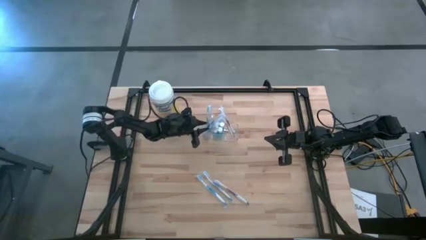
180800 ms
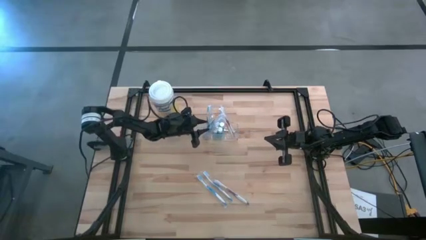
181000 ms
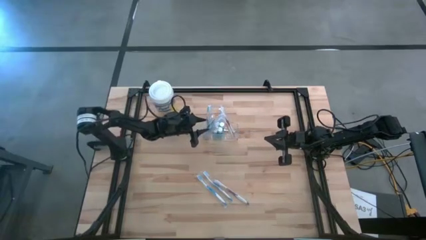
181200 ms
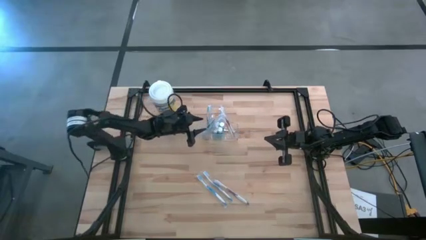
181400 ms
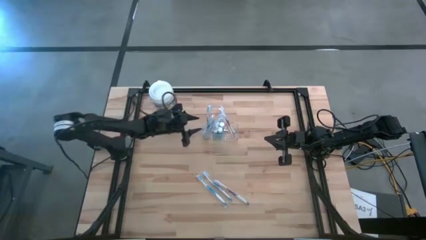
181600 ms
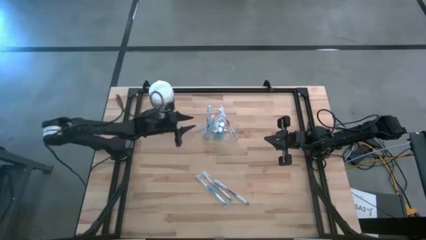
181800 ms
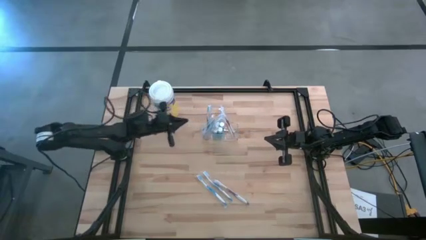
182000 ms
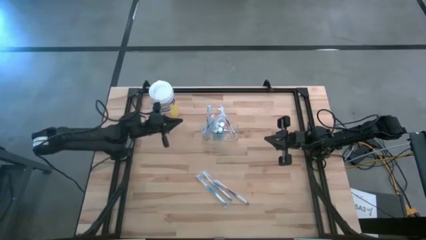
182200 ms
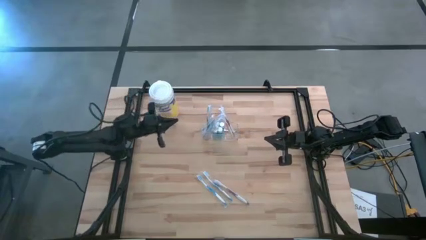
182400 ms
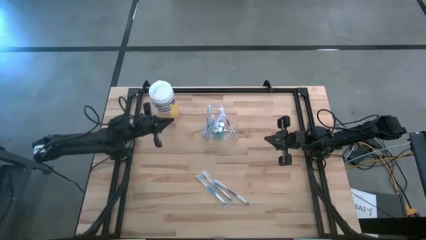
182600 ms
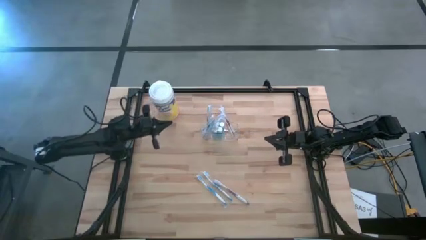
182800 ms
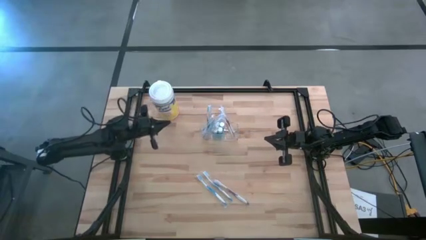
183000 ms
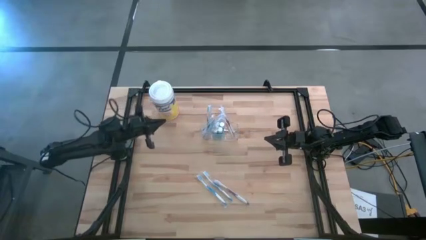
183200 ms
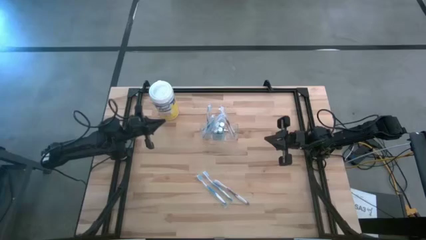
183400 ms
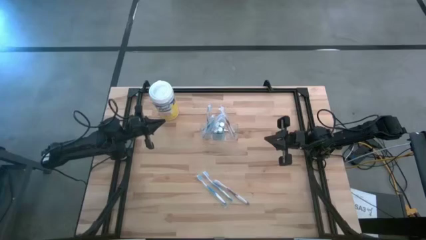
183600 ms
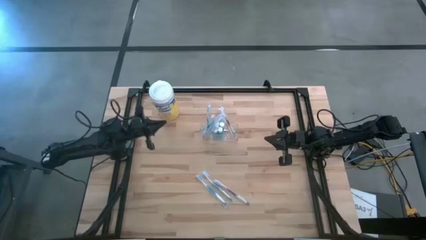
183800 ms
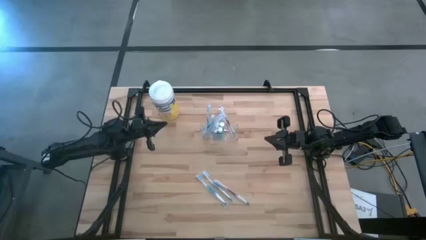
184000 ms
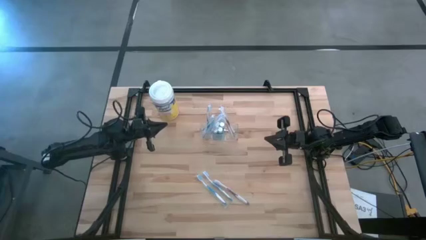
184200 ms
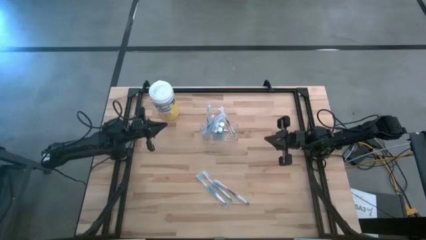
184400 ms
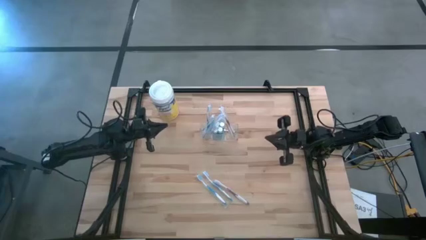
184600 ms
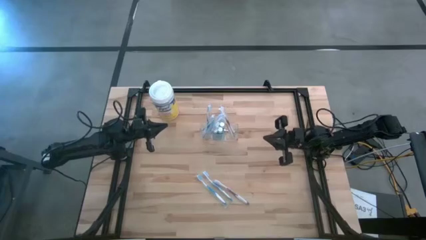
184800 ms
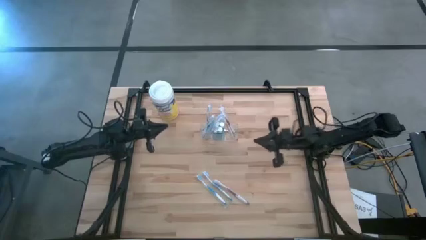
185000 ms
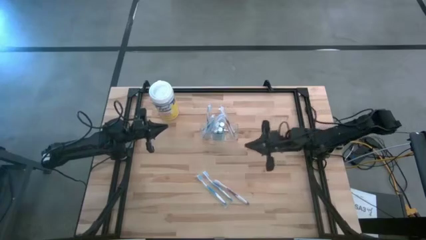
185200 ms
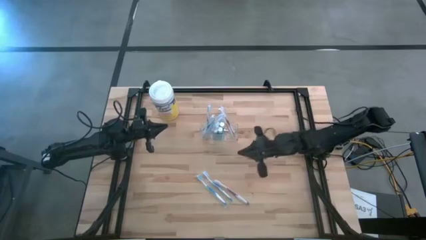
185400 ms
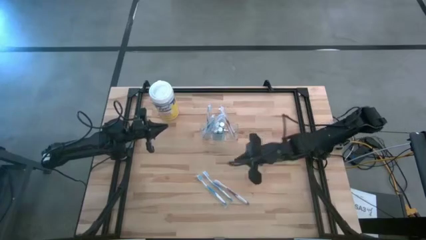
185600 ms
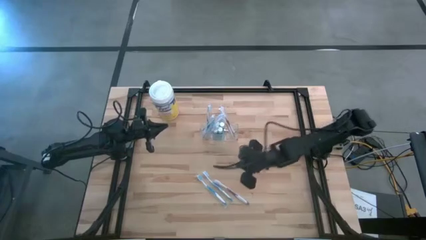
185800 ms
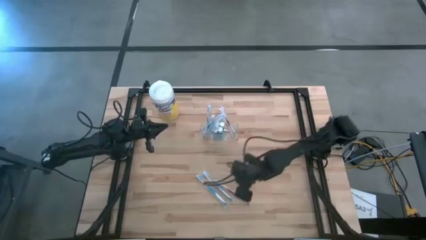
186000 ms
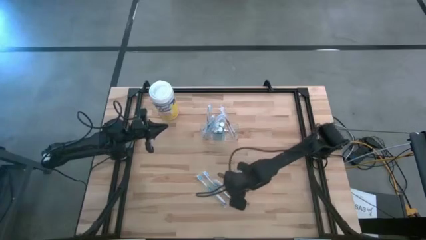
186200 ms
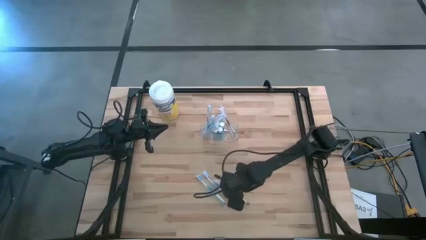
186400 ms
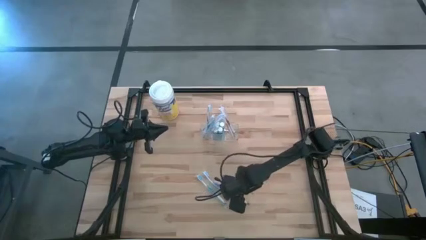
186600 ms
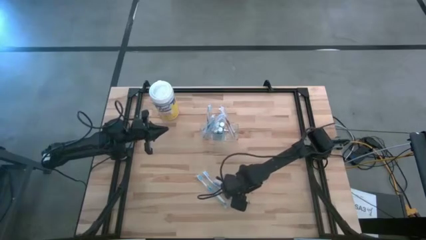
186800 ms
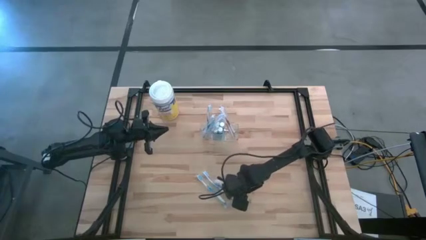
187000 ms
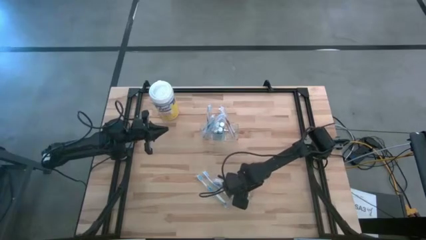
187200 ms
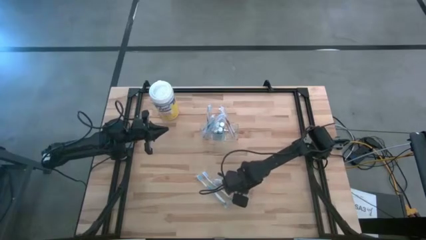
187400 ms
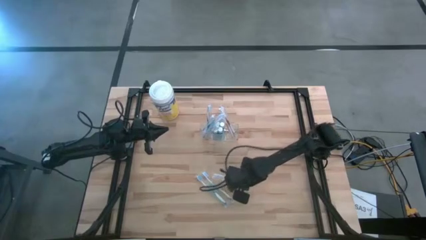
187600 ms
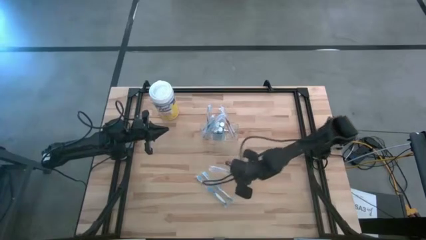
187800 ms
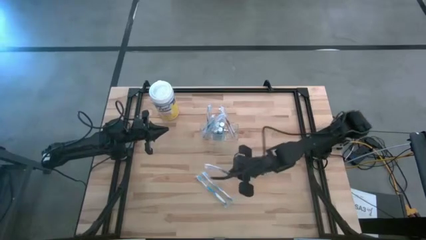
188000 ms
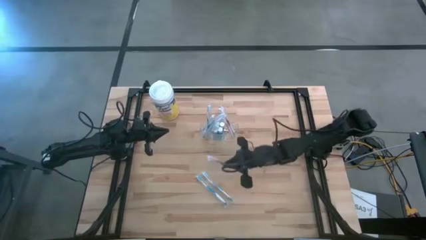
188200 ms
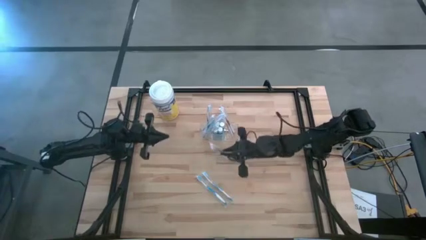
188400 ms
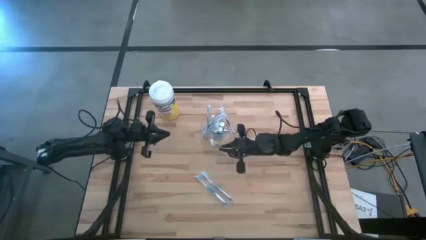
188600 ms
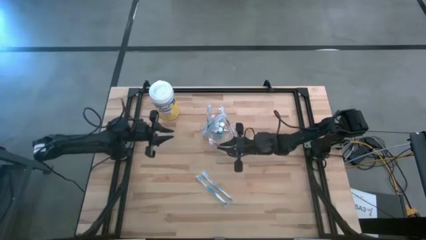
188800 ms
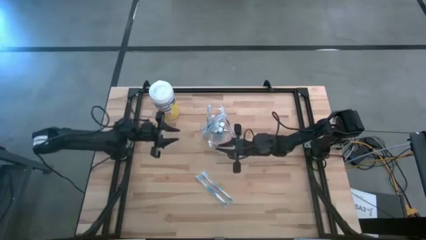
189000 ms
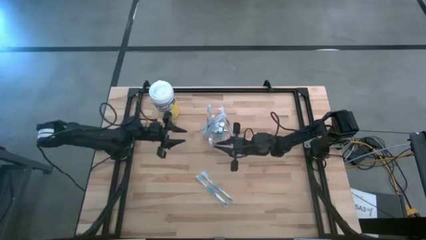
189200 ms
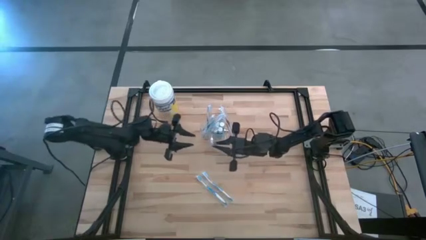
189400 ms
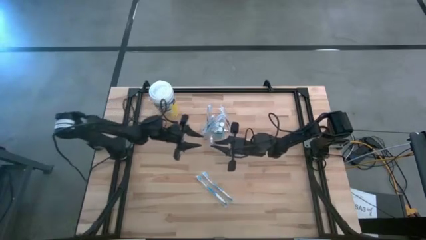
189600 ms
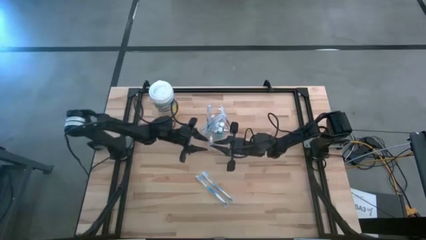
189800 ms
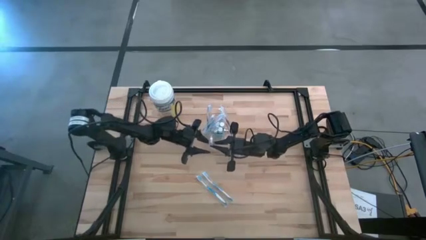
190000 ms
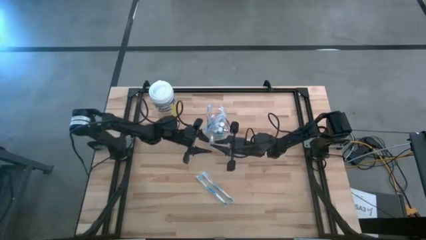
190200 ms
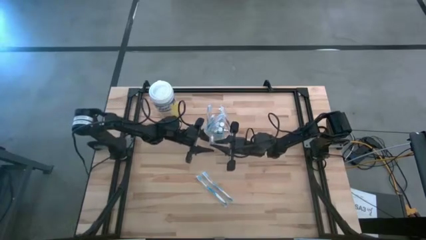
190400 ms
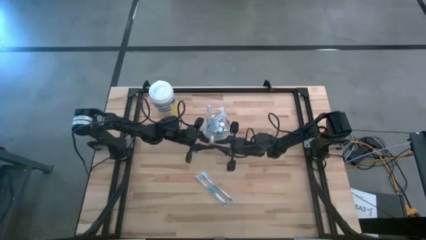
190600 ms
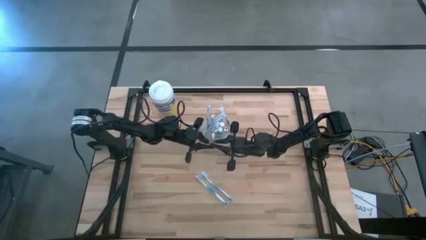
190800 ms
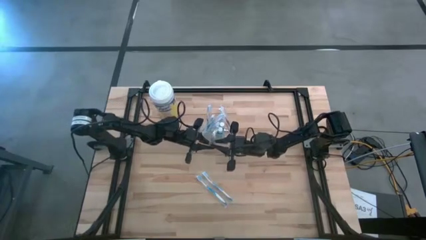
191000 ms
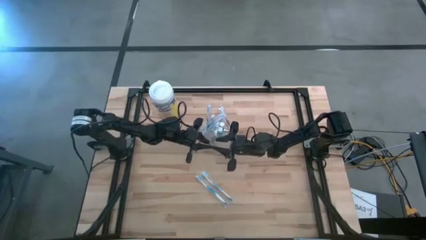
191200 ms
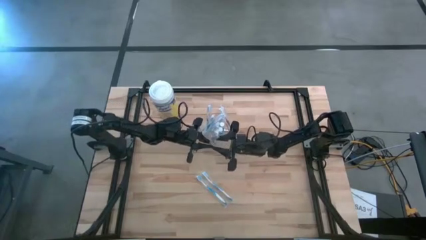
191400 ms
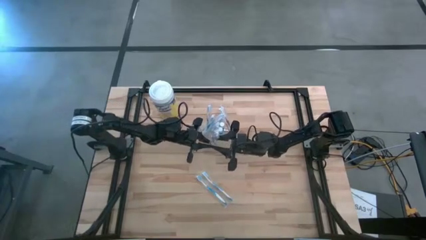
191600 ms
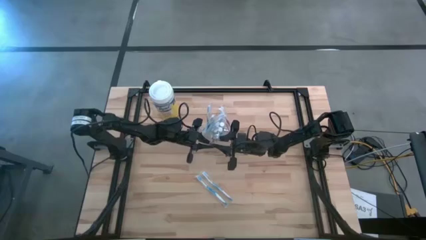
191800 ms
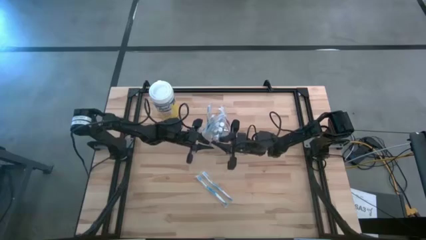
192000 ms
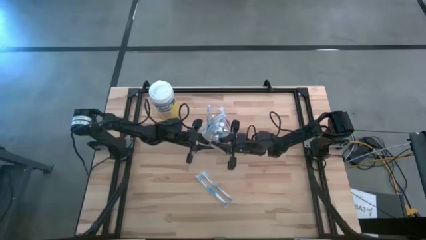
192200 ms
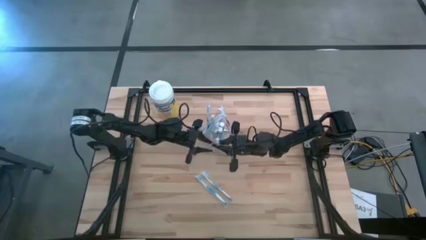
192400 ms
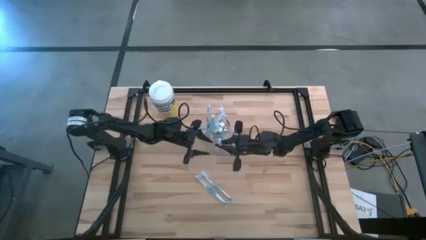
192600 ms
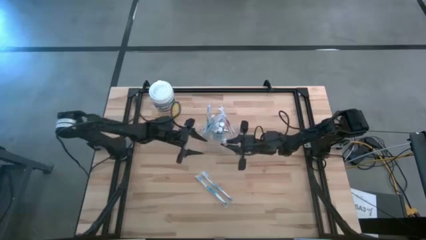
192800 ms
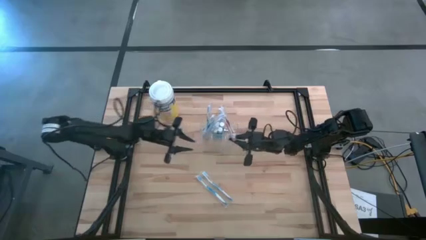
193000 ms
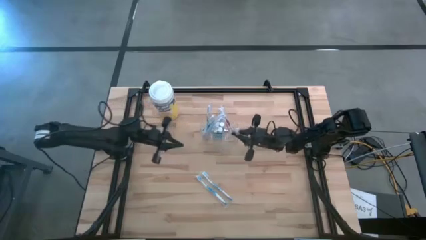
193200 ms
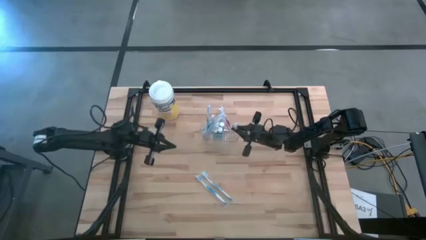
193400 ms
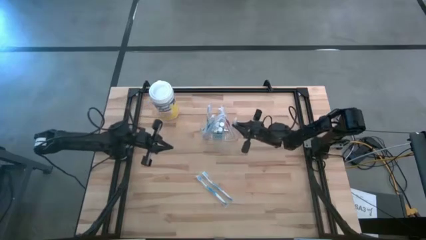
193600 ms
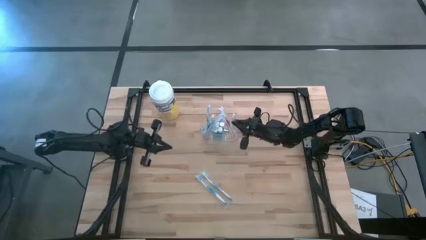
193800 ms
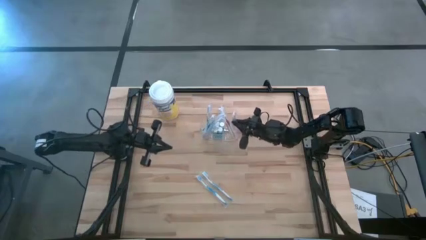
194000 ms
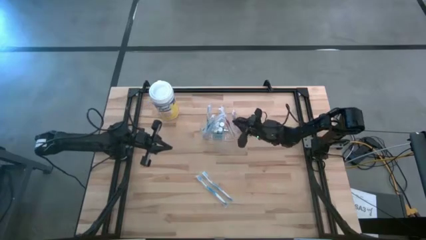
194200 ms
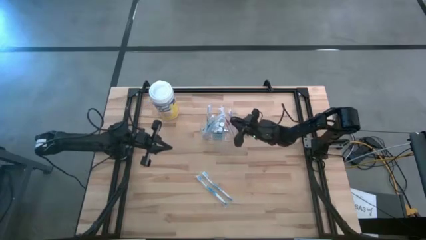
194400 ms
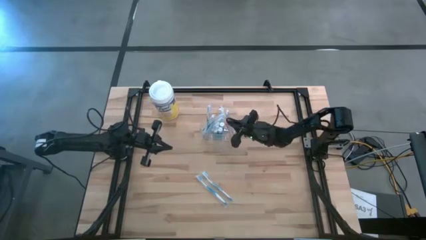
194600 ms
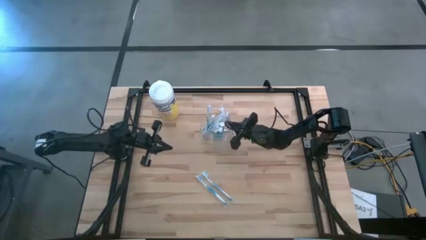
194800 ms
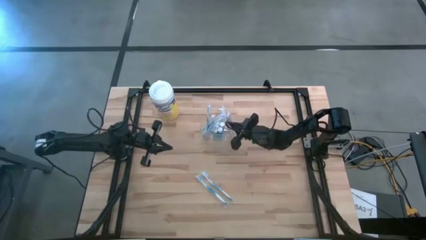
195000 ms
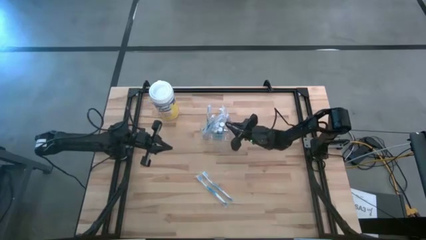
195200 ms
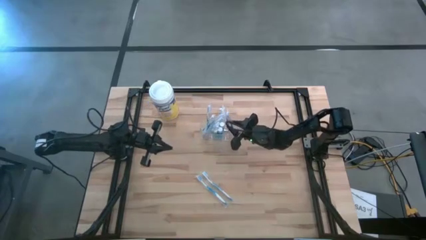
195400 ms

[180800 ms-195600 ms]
Task: Pick & Place toothbrushing station
Put the purple toothbrush into the right section of the transparent organizer
